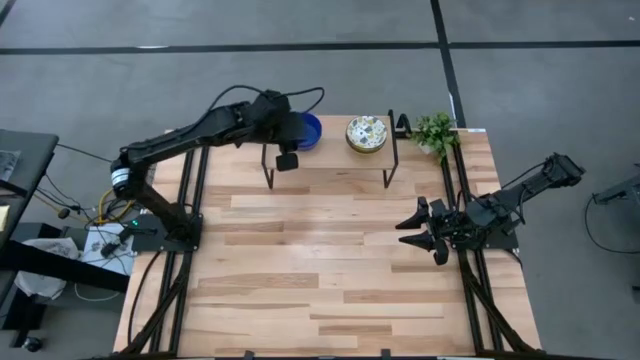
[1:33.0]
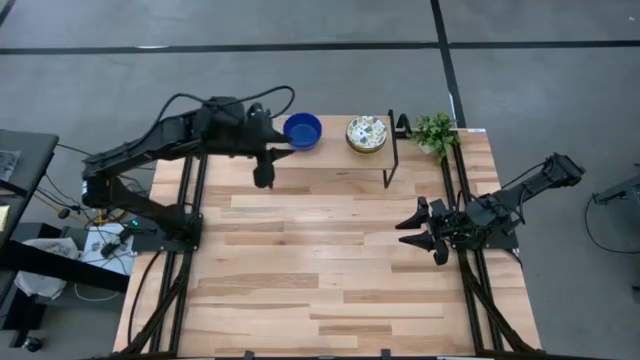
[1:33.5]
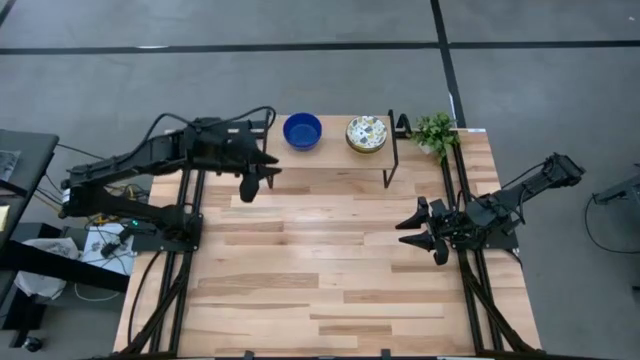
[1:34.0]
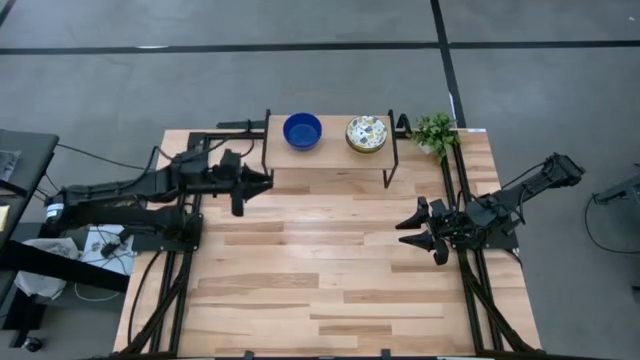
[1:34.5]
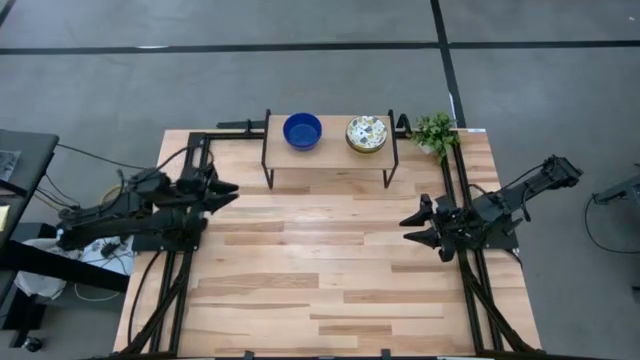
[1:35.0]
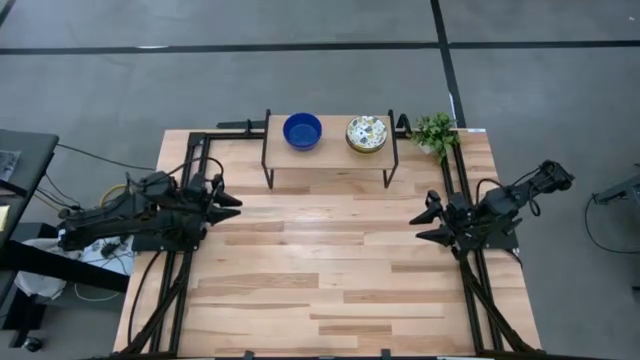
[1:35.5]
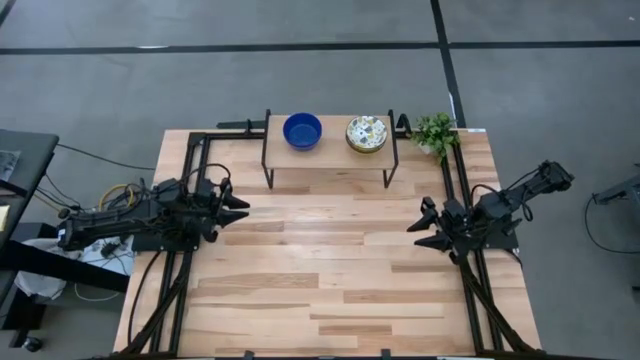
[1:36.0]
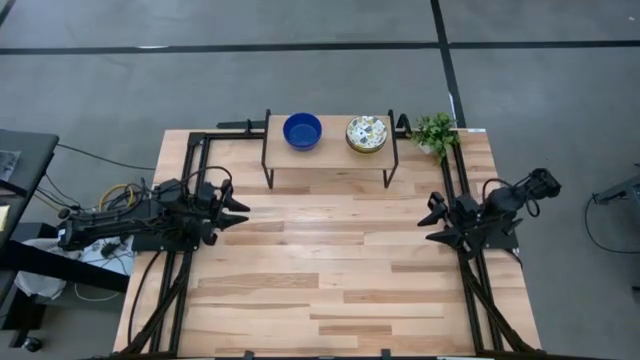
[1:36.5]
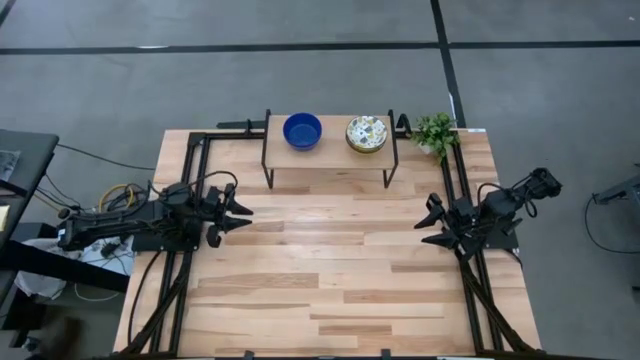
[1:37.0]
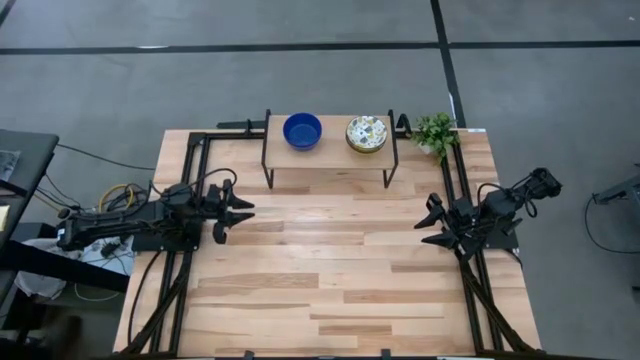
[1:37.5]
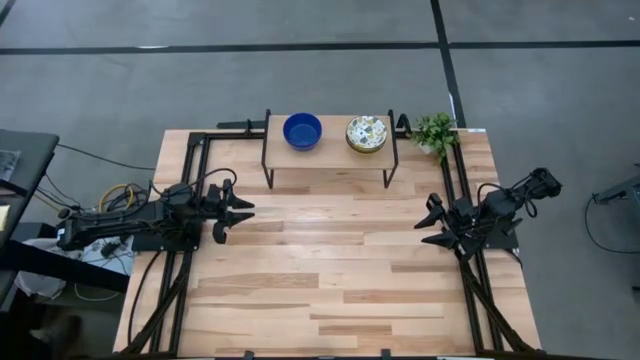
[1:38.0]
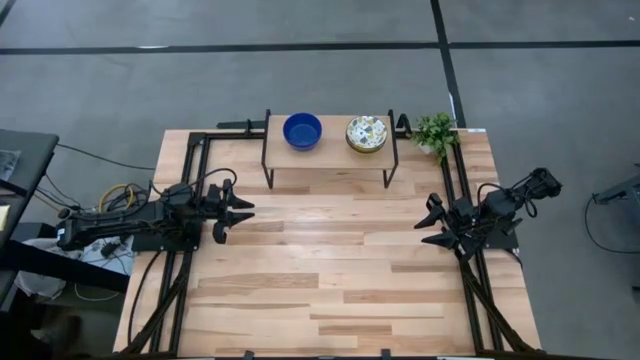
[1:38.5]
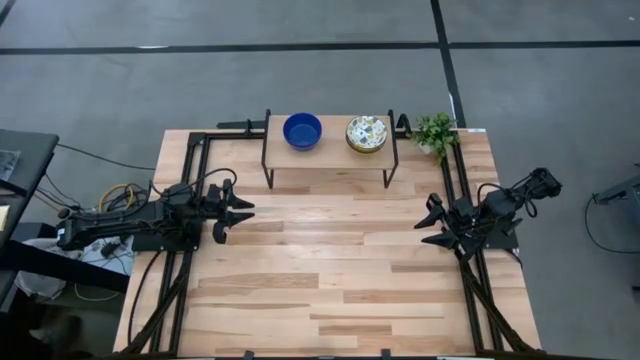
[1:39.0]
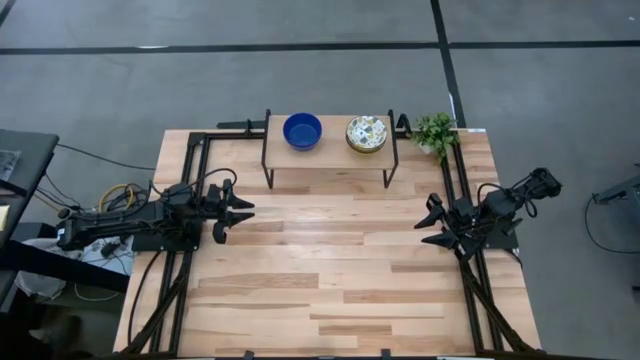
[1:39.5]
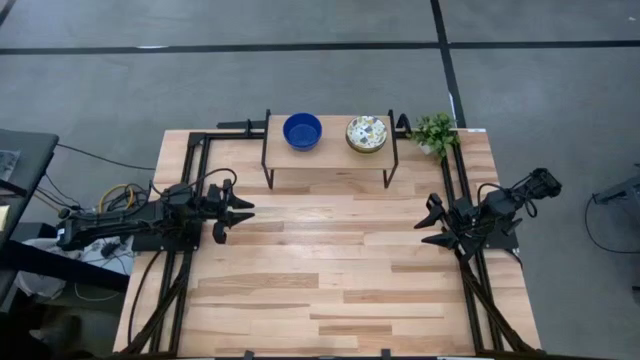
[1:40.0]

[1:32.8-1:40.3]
Task: Pick & Place Mini bowls
Return to Home Position

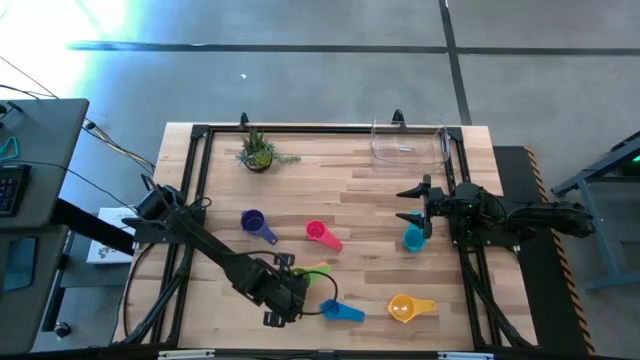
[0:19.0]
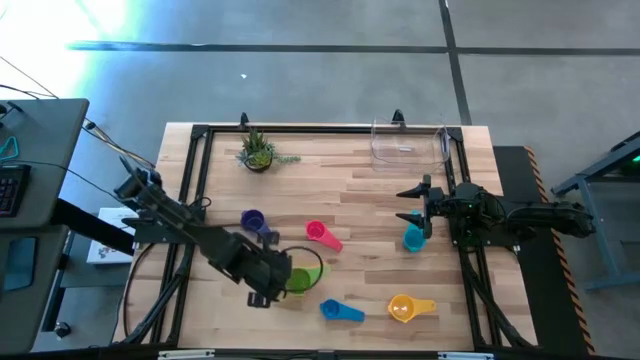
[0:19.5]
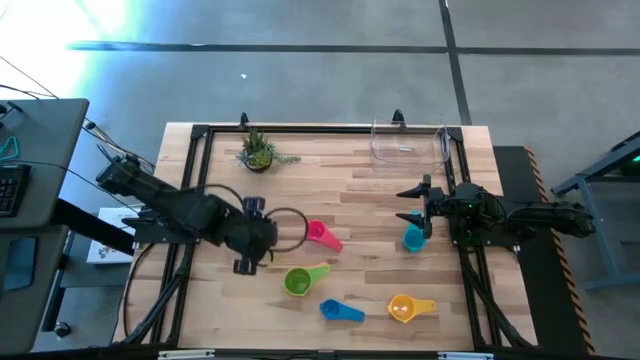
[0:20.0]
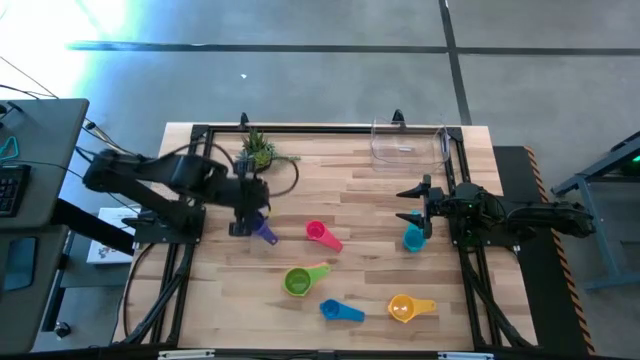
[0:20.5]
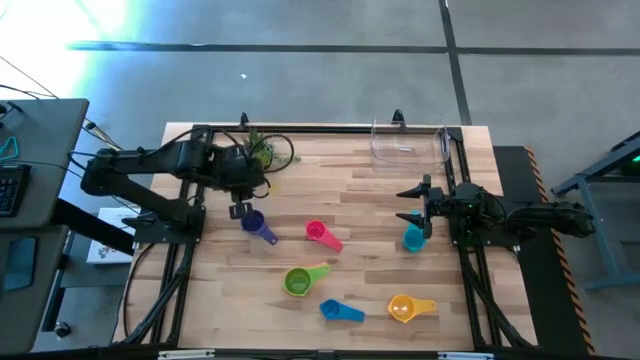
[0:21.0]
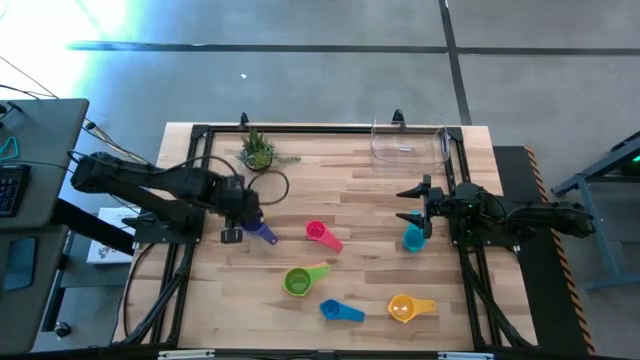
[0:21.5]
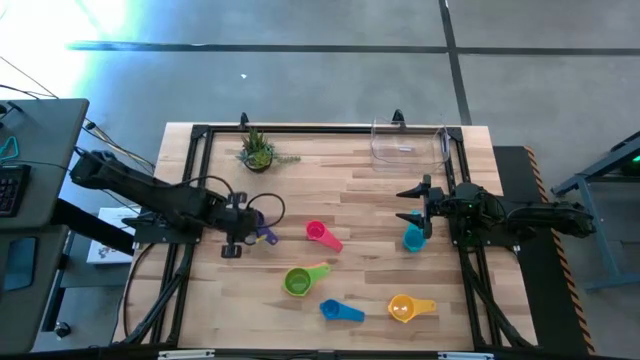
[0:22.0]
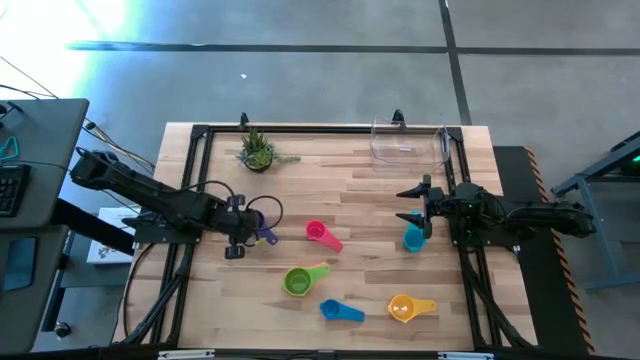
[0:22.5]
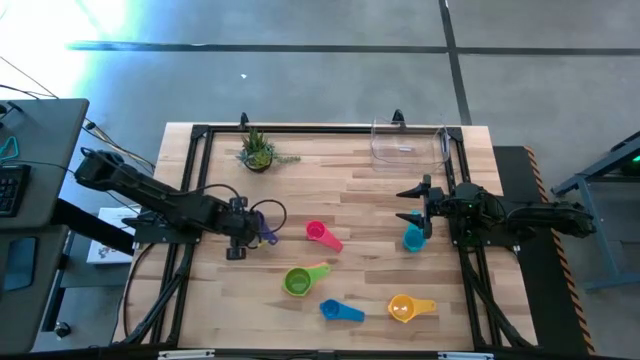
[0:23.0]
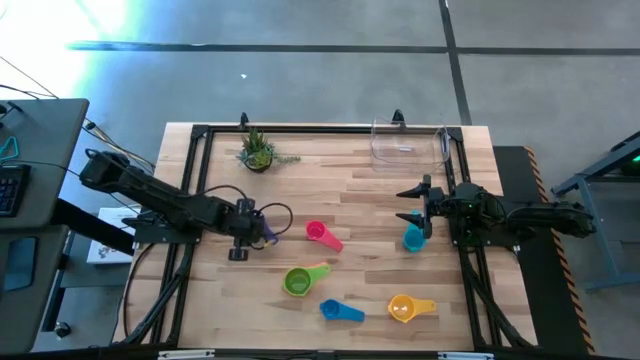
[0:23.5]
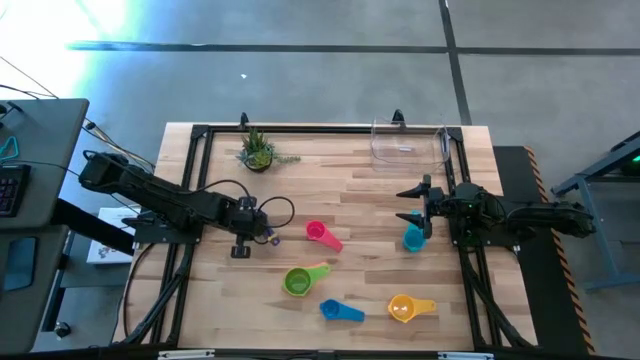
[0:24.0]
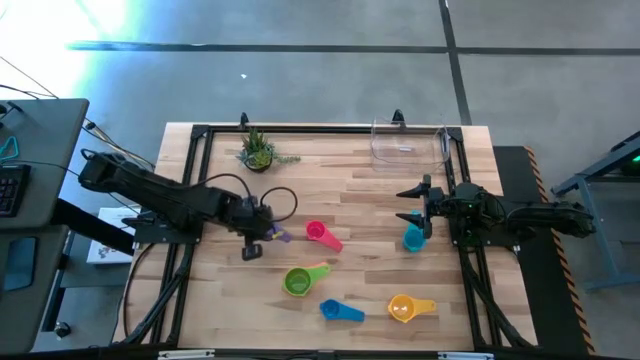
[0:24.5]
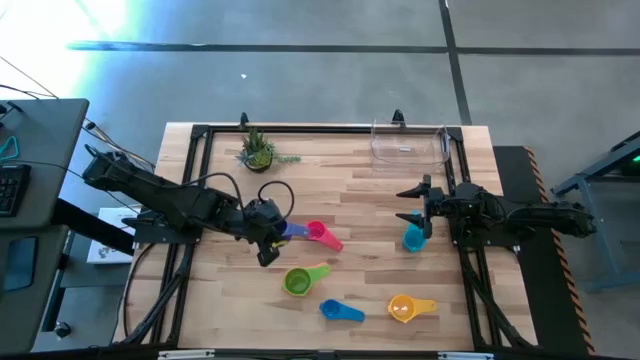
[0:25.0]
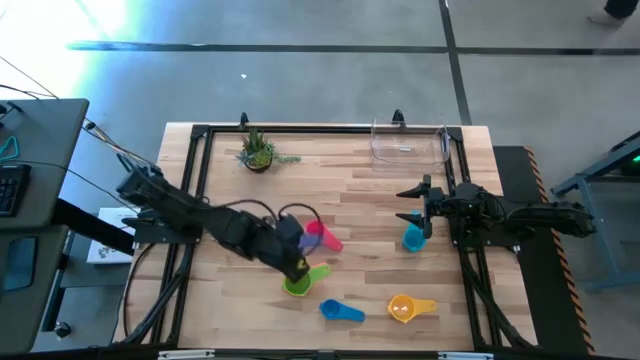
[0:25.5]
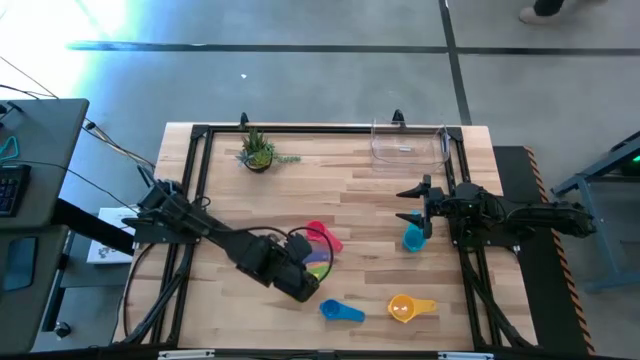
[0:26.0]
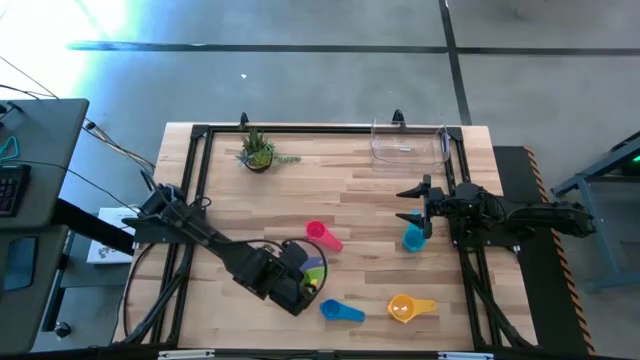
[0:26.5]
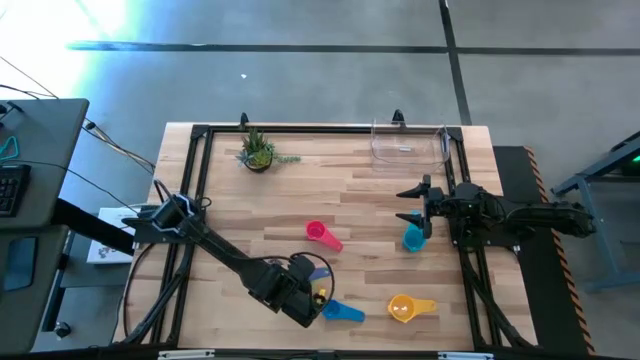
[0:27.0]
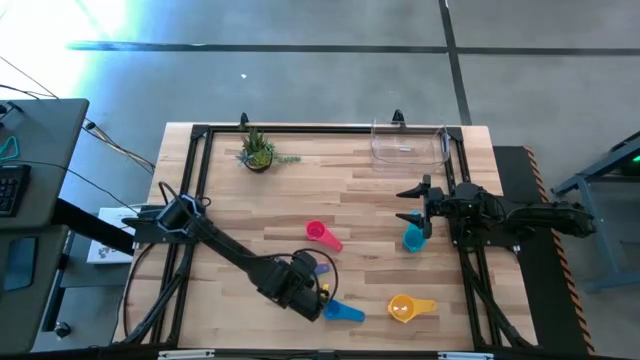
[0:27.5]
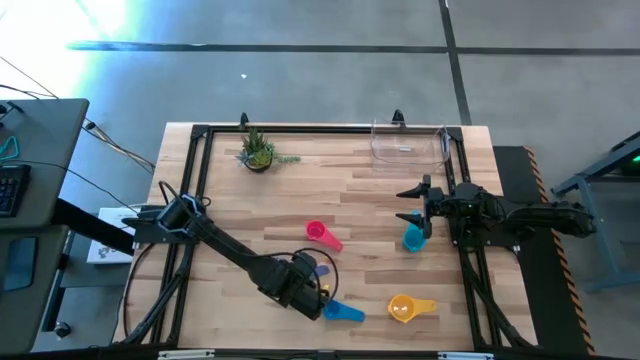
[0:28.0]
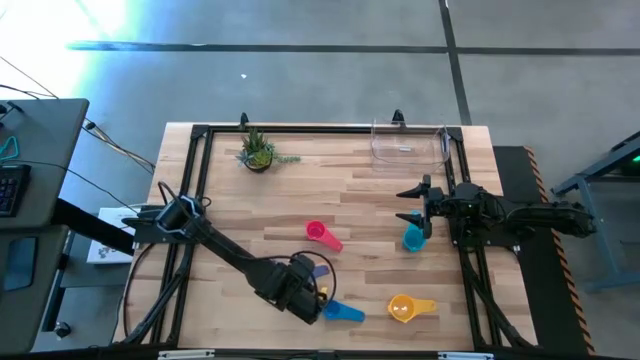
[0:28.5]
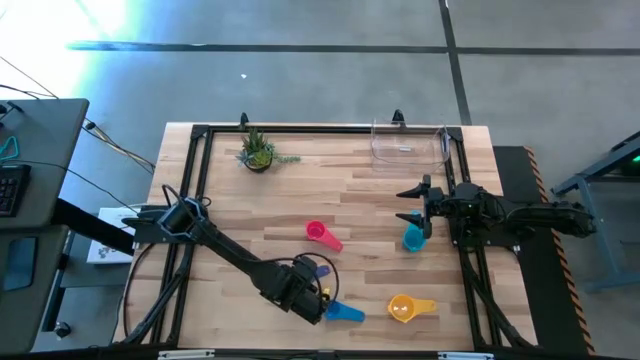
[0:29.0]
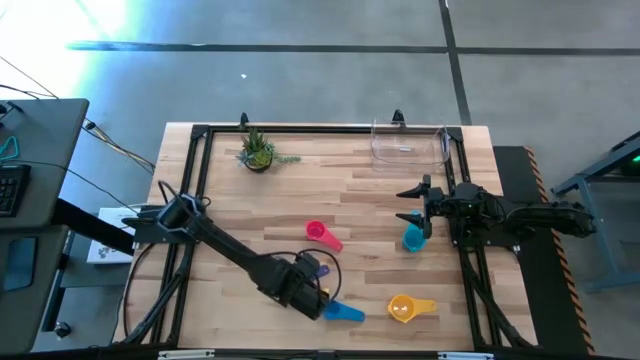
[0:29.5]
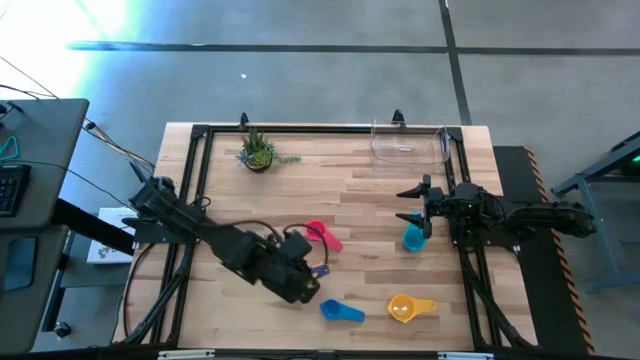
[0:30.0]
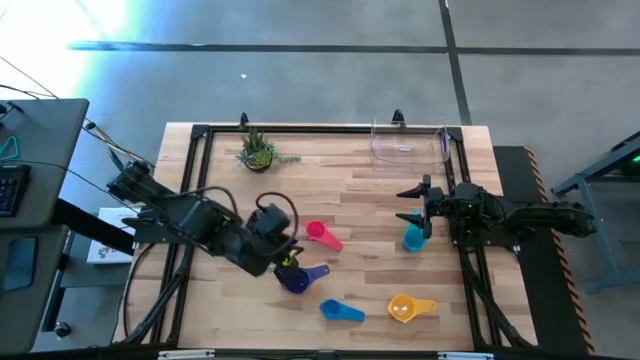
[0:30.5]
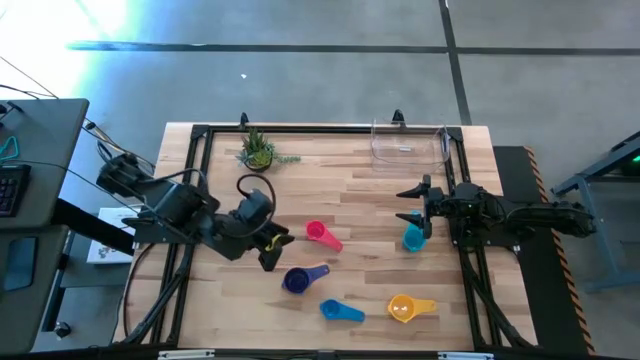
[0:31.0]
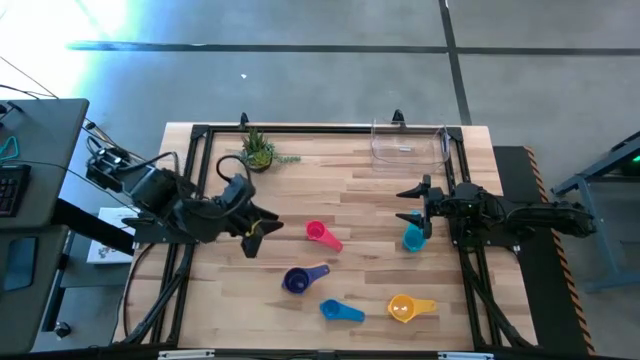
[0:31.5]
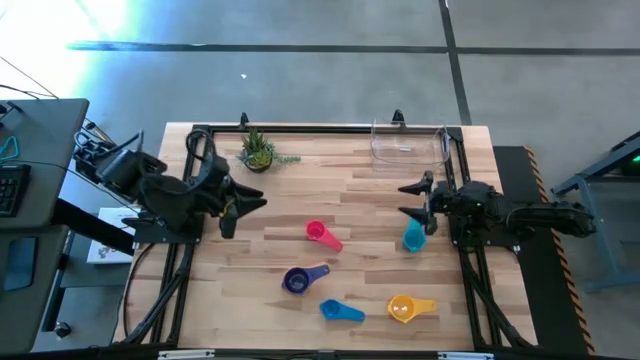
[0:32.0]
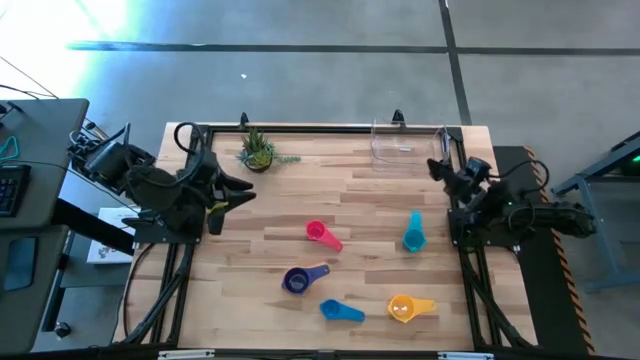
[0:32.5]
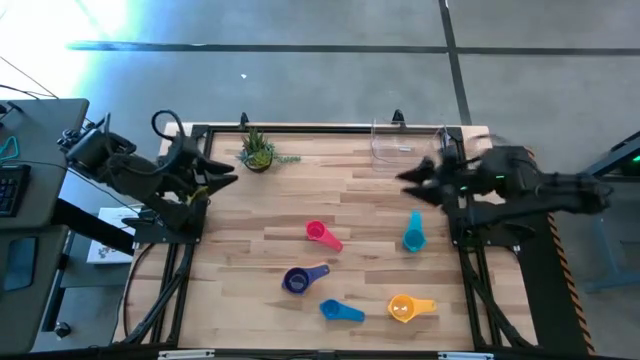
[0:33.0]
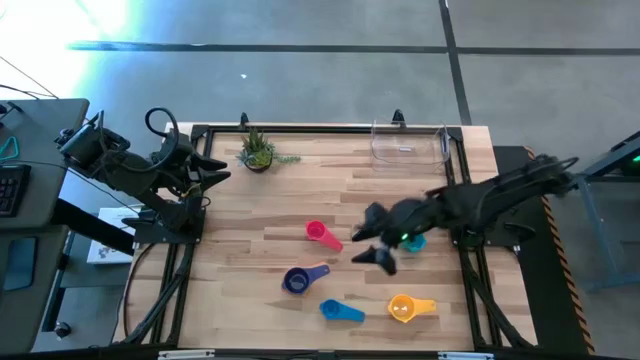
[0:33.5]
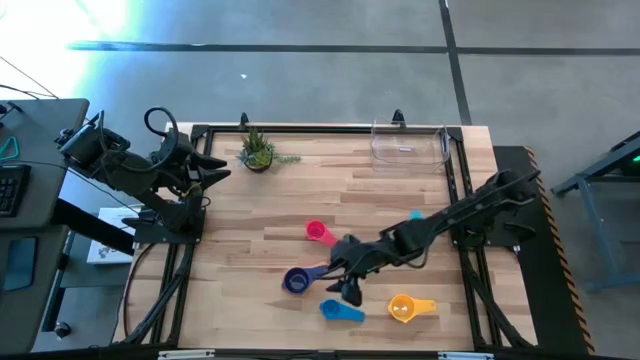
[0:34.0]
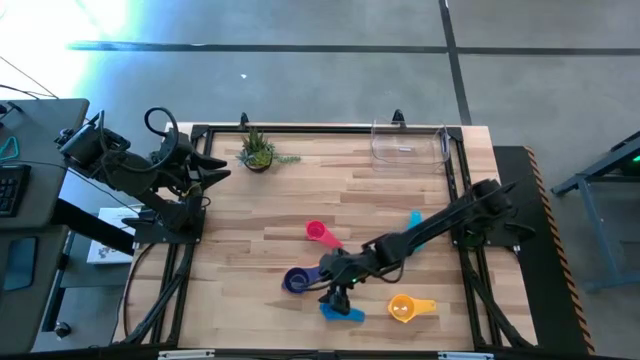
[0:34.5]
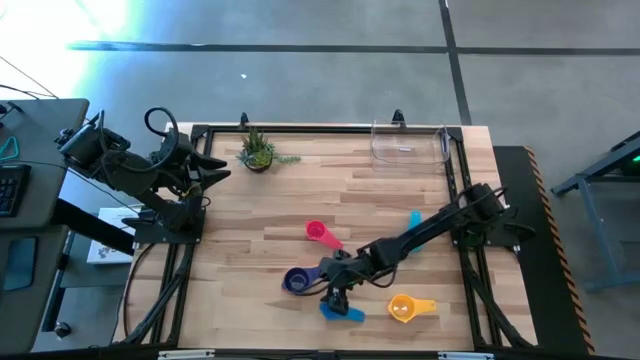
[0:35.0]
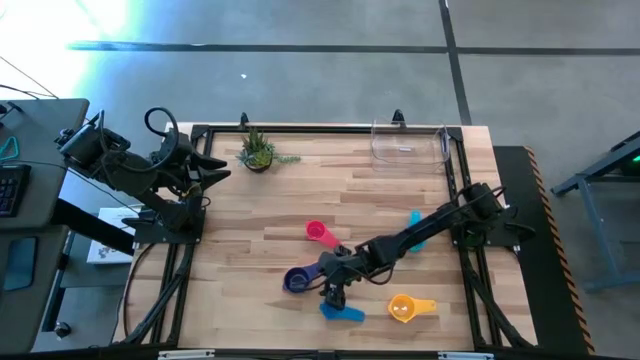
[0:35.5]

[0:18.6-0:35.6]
Task: Nest measuring cups in basket
Stack the violet measuring cup on top of the green measuring cup
